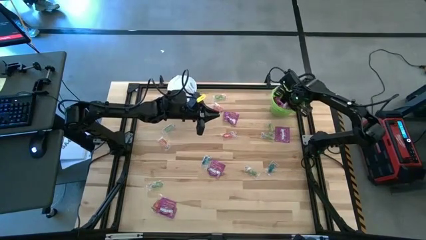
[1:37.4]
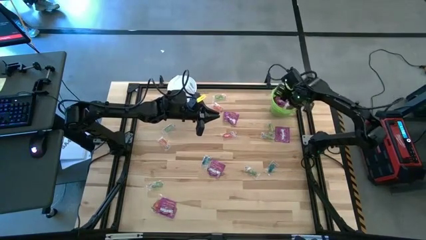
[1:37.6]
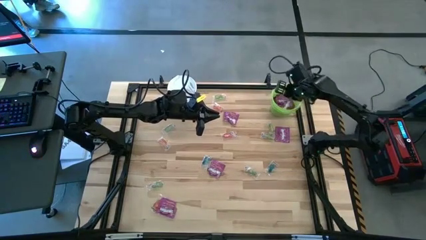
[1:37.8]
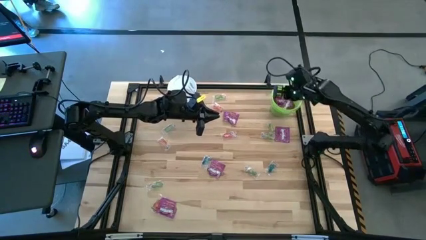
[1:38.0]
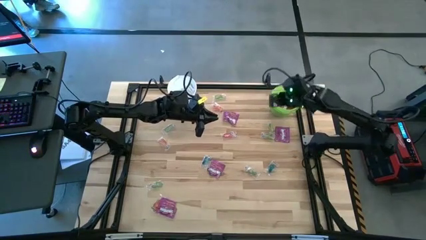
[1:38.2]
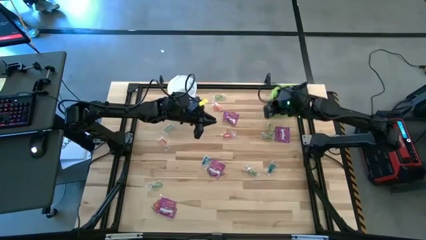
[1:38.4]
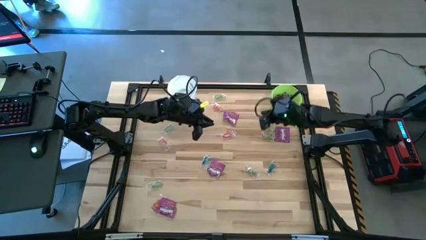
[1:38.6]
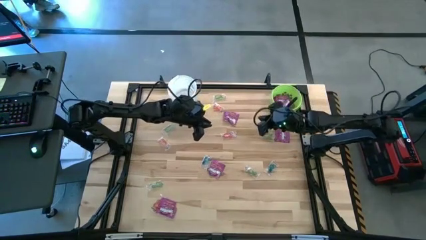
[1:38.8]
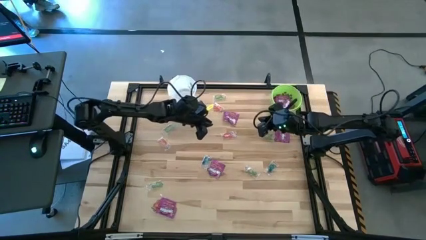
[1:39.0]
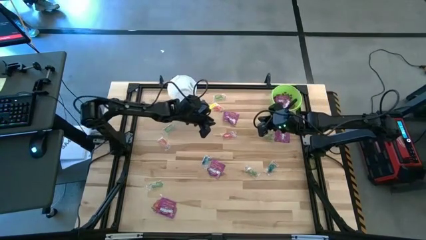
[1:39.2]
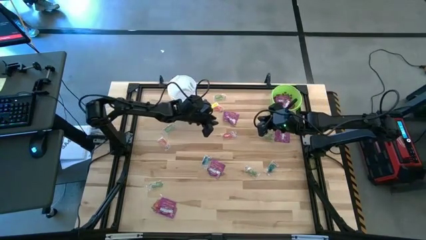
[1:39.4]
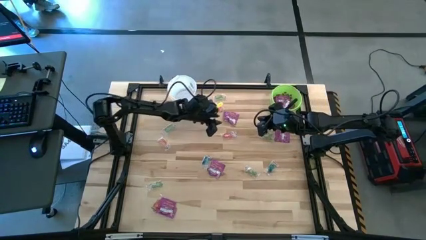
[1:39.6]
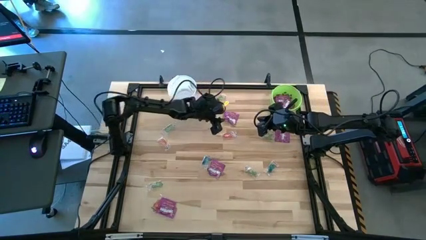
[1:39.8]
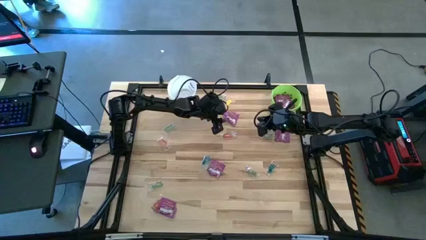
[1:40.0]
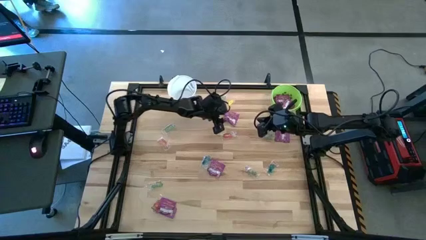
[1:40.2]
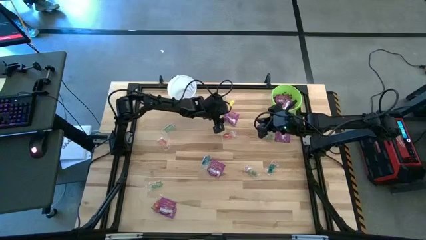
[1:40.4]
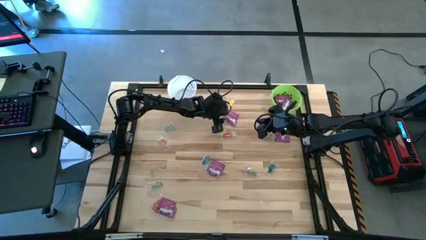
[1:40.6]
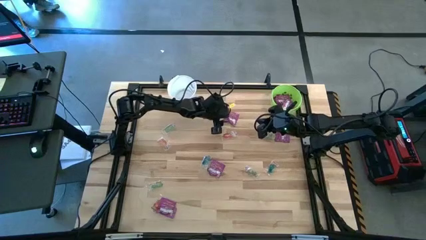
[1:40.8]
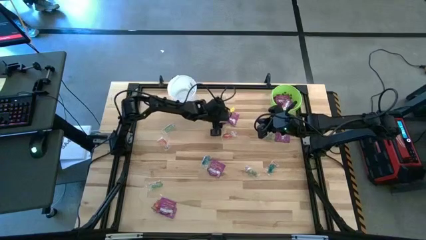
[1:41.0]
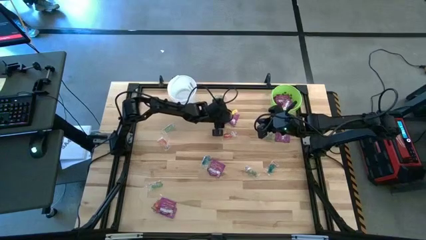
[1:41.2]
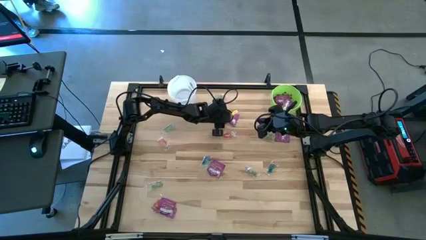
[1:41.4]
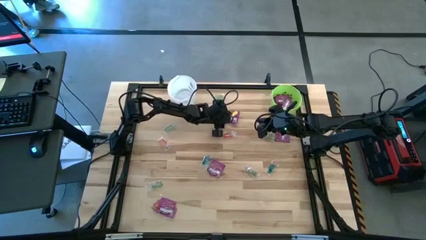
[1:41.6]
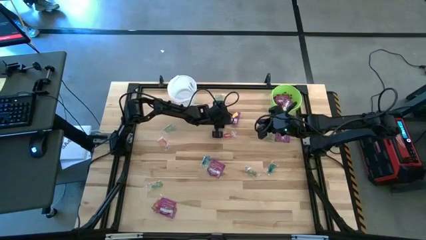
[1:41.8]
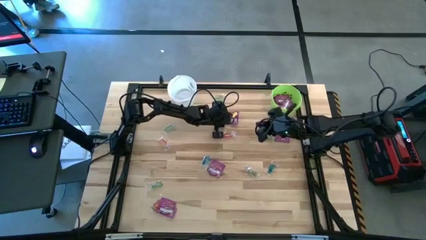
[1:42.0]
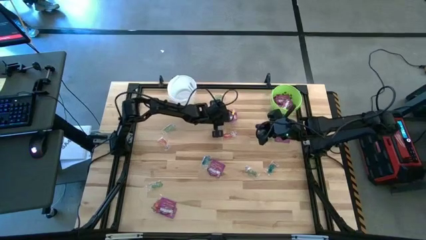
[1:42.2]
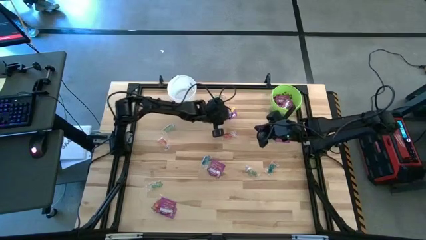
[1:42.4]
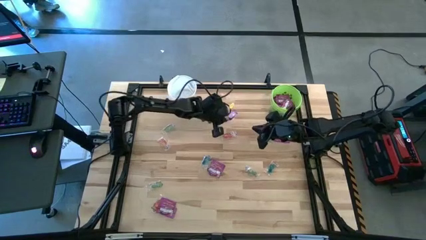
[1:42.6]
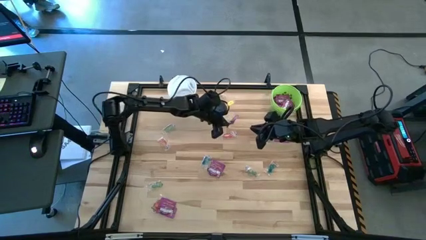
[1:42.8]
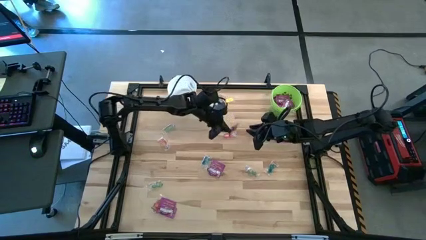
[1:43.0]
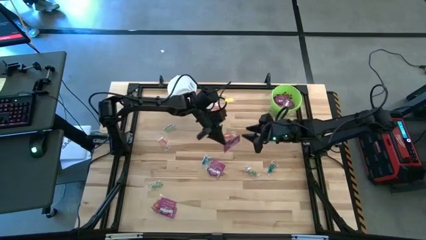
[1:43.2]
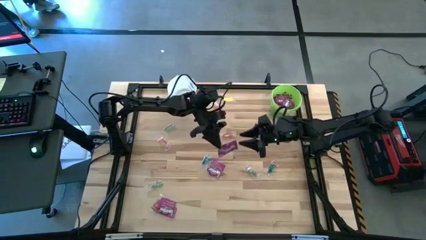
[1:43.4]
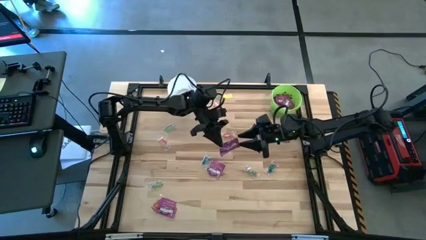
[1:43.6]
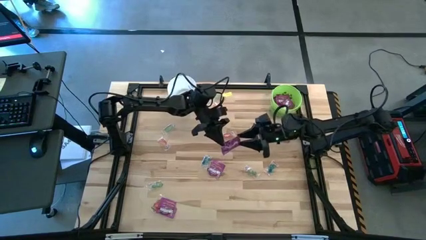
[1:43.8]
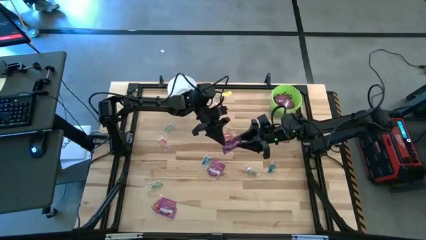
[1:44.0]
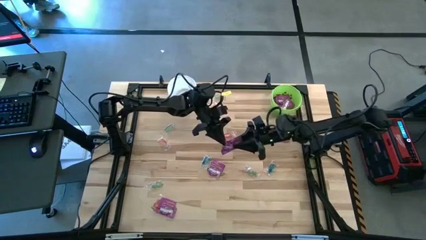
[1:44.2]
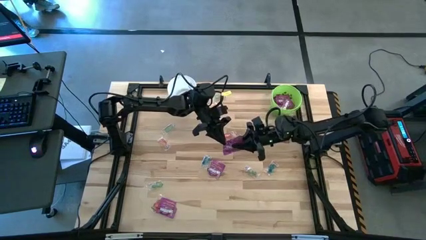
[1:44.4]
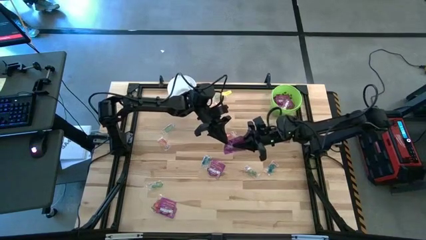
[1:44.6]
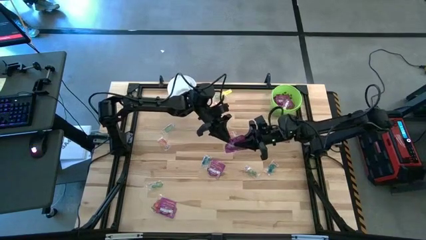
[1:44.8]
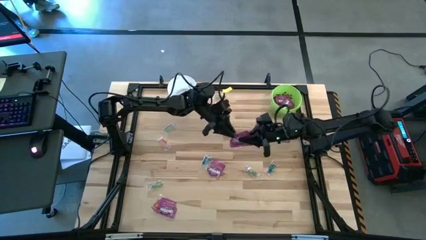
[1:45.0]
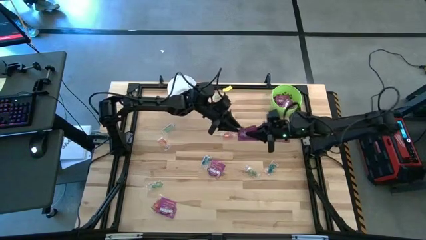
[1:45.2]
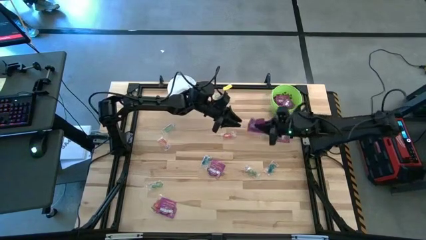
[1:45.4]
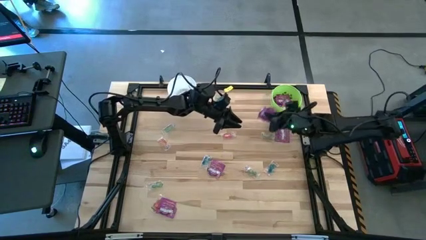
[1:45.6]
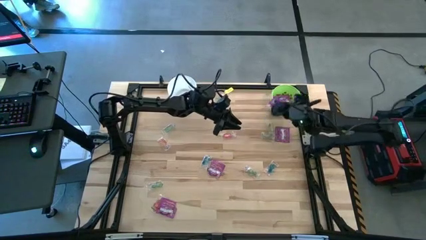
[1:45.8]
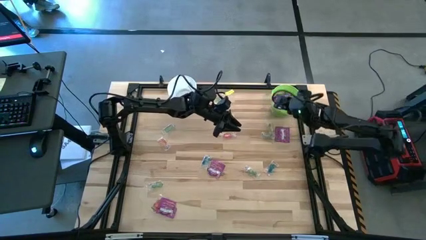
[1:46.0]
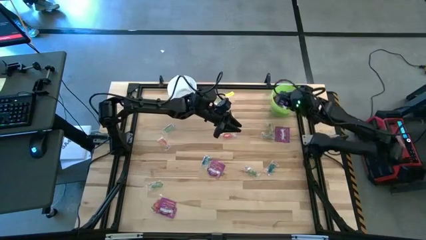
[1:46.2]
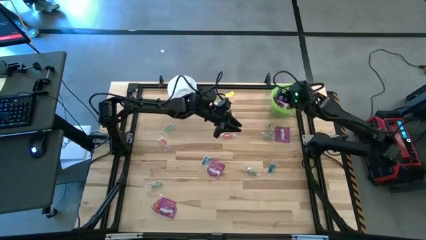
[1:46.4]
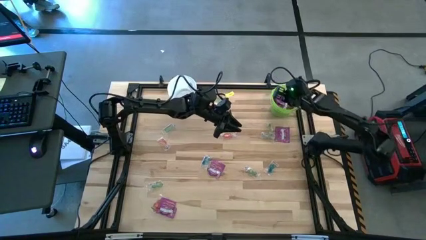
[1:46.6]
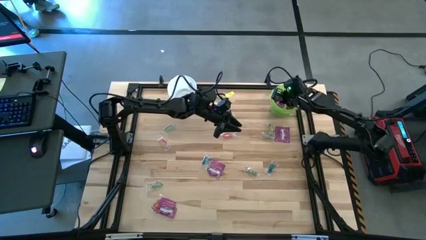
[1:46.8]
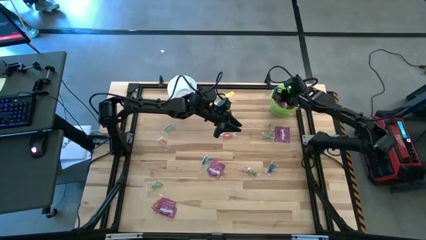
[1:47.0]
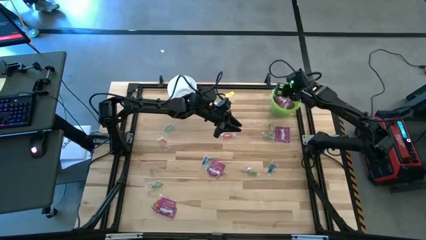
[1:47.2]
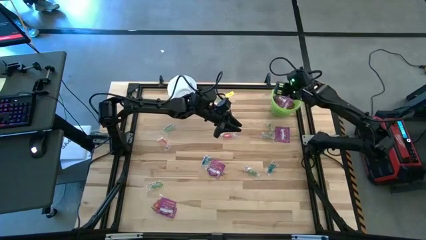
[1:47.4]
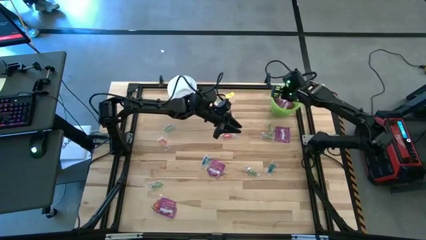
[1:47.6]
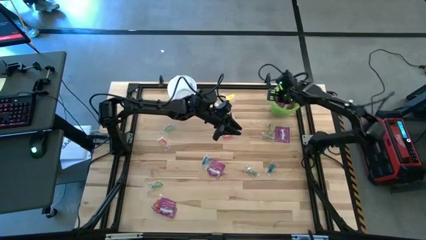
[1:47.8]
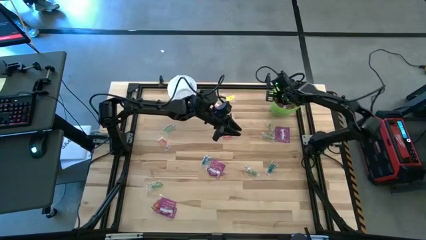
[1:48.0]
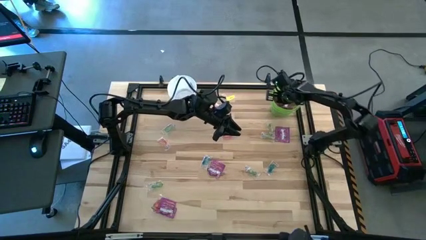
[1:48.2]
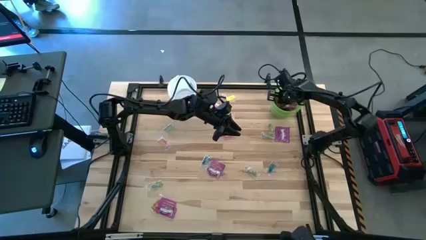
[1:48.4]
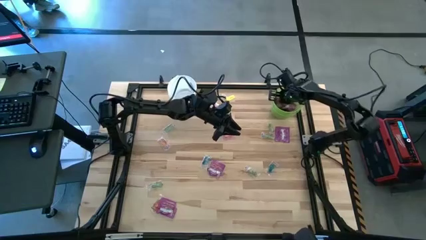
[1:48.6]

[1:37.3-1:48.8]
Task: Sort candy by brand, put in halloween buckets
Put the violet candy into the green bucket

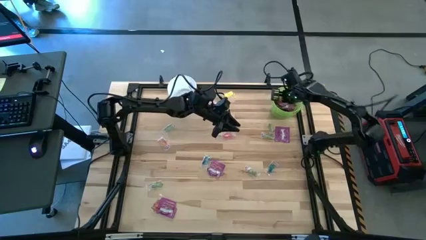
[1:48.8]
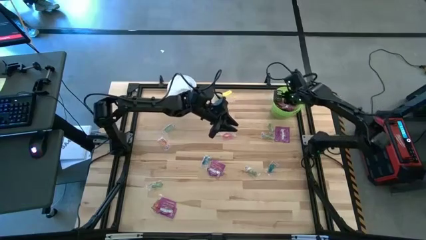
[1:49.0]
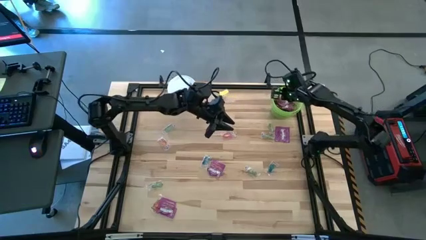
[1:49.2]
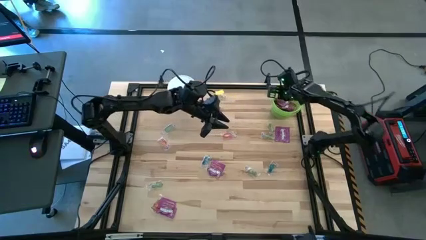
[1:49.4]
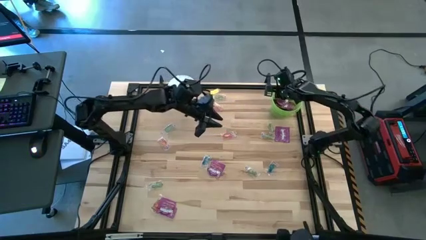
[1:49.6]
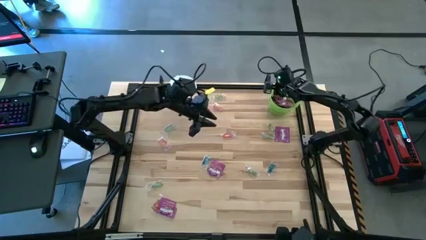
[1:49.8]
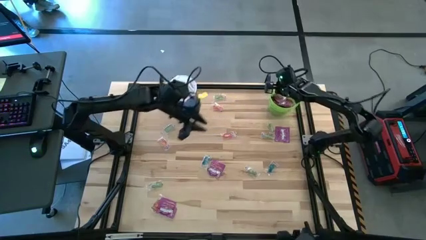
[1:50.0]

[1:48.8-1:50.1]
Adjust the green bucket

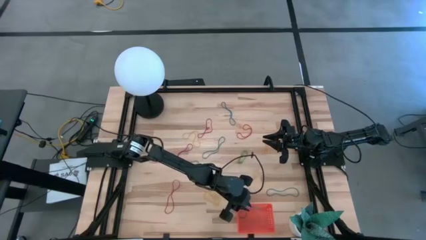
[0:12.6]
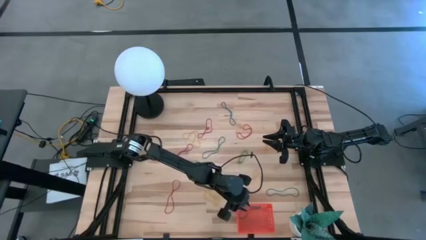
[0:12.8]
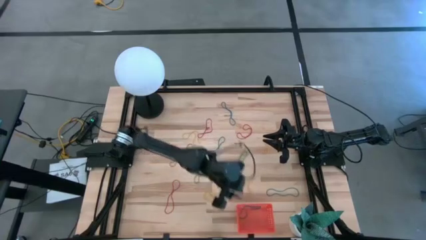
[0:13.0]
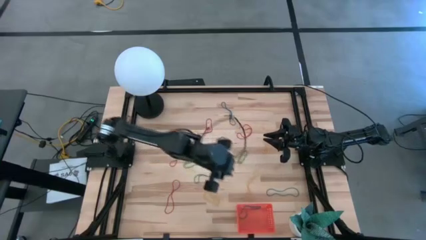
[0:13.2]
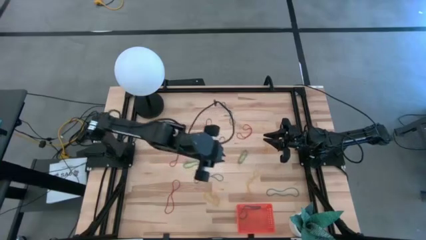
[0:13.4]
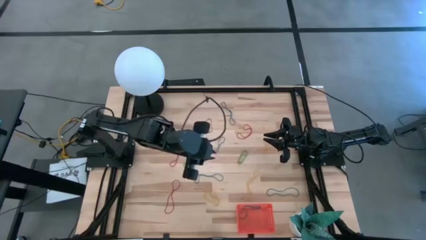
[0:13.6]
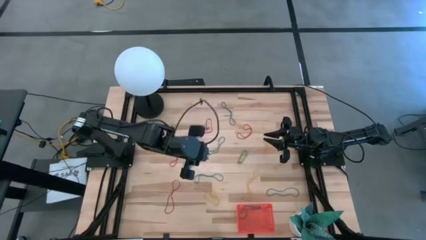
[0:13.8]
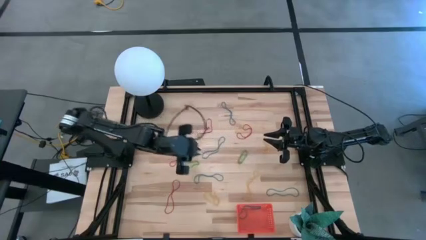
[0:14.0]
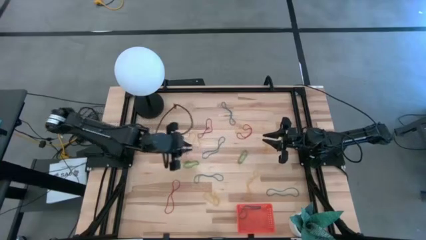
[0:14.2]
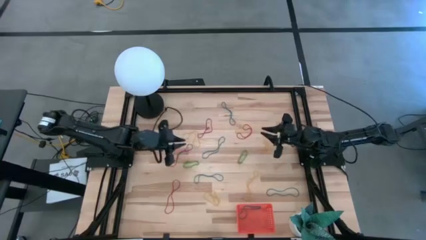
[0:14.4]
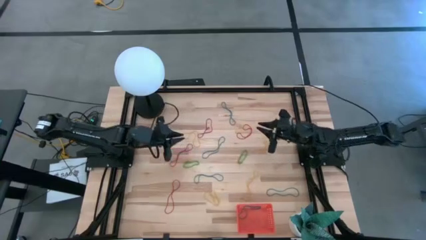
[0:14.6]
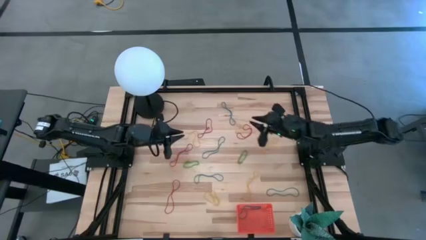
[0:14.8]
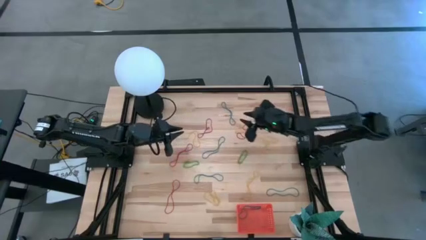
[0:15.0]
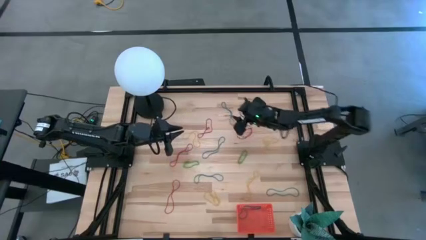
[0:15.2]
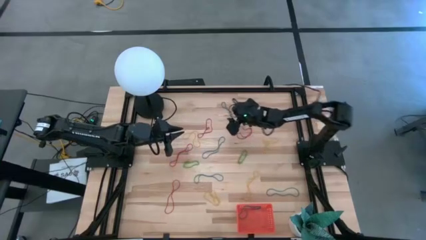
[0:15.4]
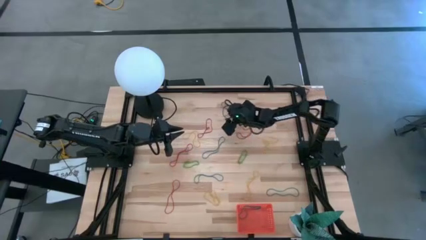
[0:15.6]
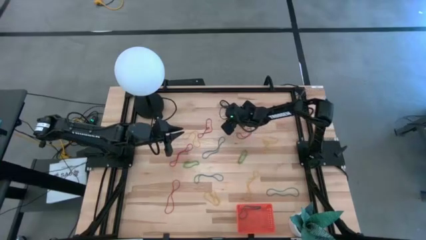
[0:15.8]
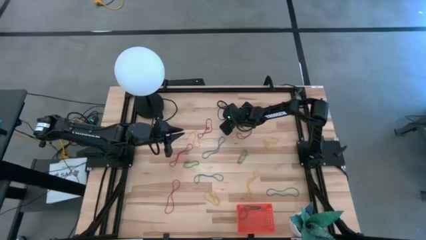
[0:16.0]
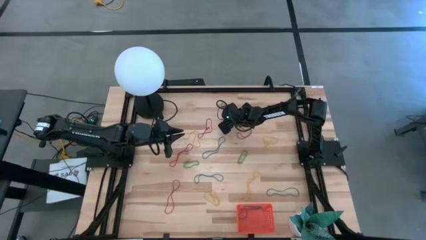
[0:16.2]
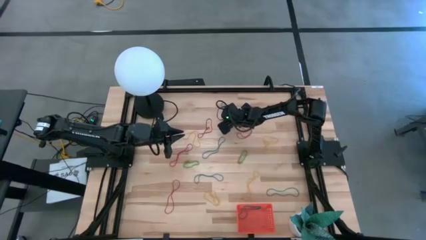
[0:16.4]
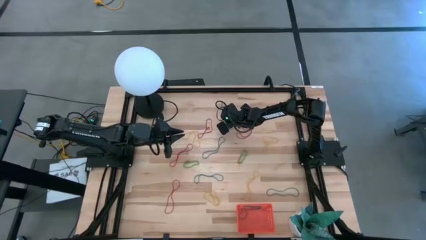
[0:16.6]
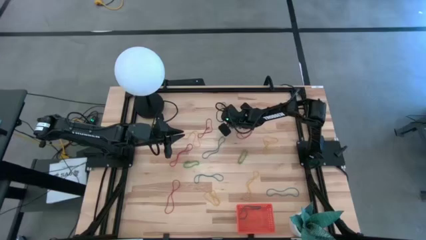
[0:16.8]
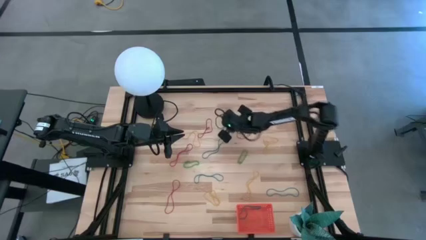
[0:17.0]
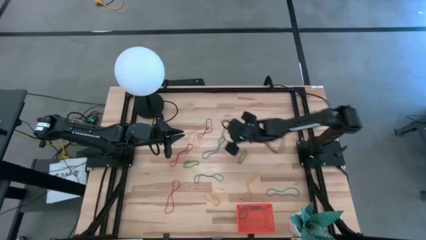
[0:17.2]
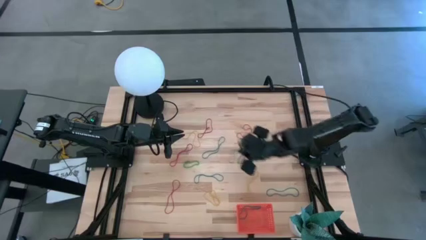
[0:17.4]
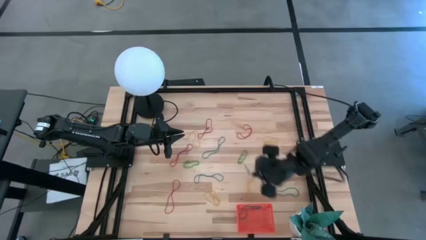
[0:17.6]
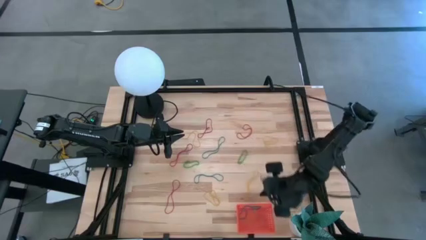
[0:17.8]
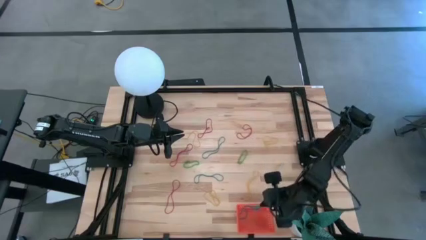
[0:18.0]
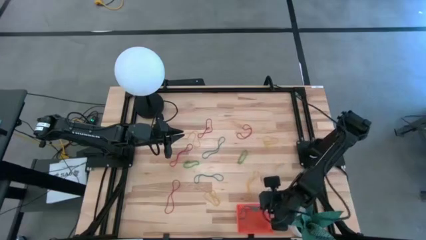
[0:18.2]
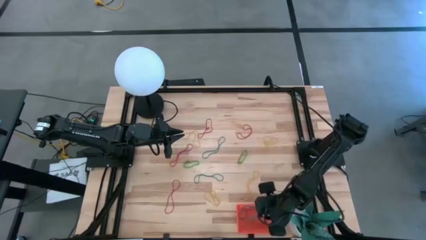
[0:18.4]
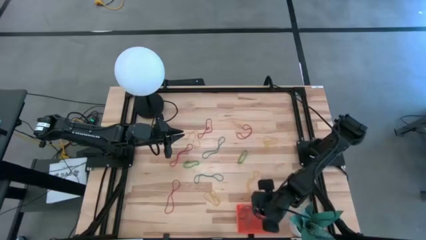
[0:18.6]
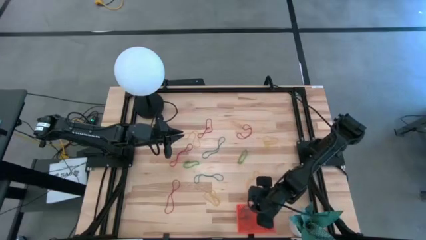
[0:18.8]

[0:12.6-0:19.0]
Task: Pick and place items into bin
Put the blue rubber band into the orange bin
